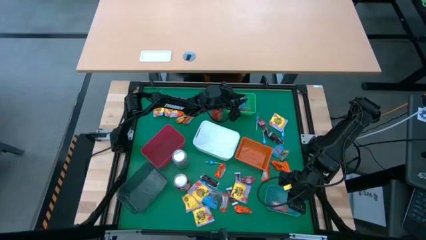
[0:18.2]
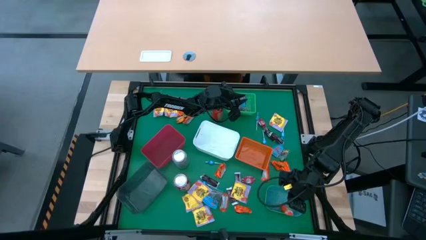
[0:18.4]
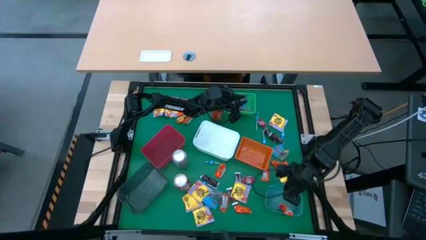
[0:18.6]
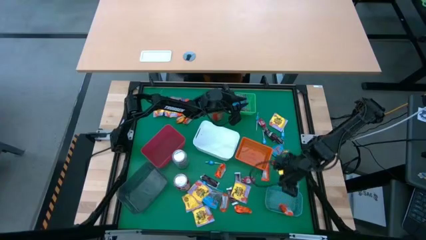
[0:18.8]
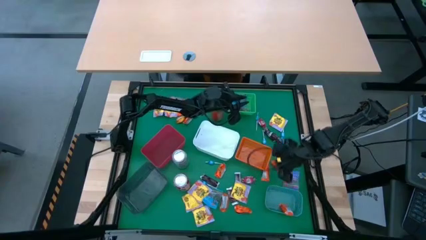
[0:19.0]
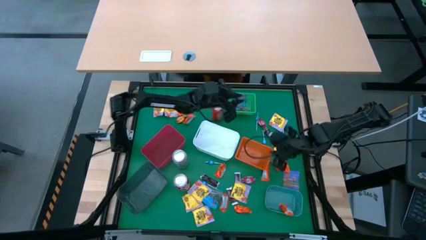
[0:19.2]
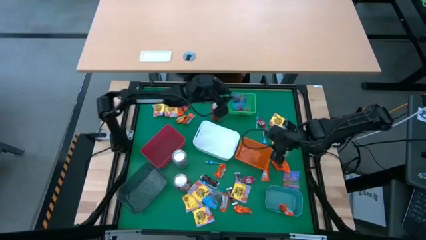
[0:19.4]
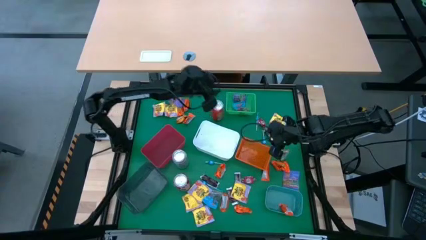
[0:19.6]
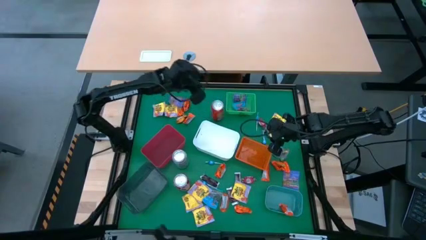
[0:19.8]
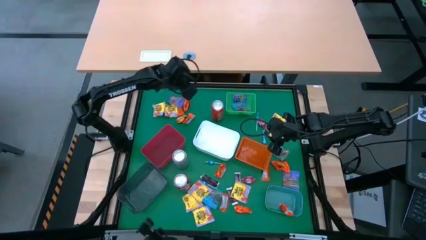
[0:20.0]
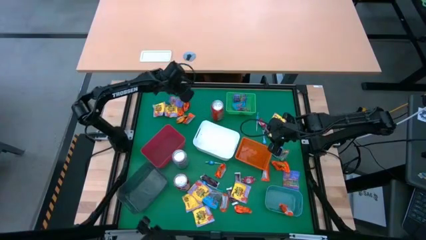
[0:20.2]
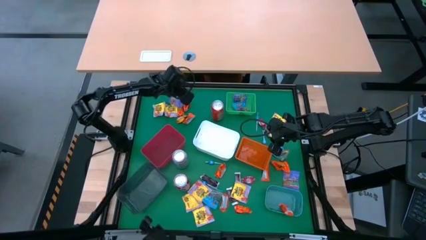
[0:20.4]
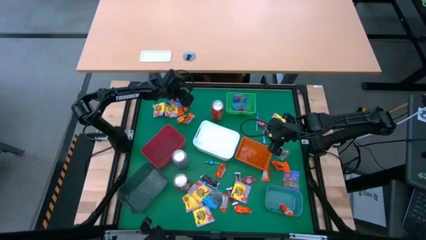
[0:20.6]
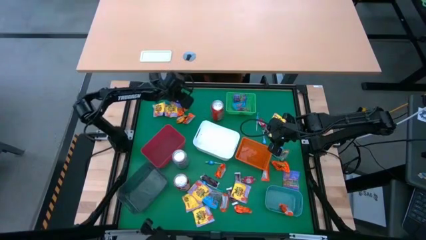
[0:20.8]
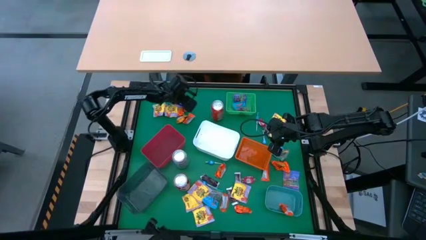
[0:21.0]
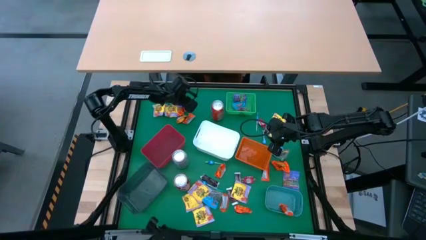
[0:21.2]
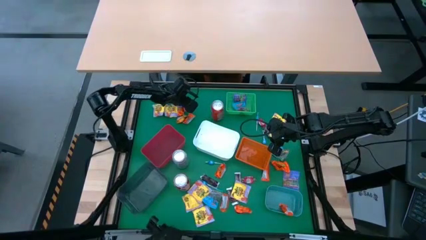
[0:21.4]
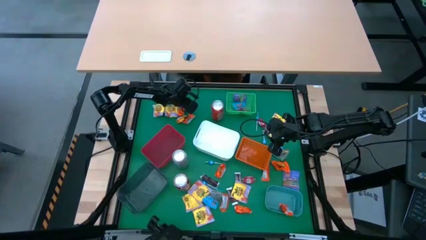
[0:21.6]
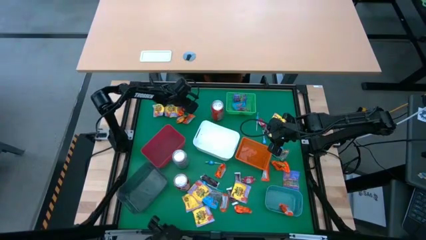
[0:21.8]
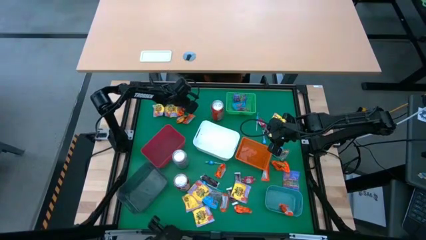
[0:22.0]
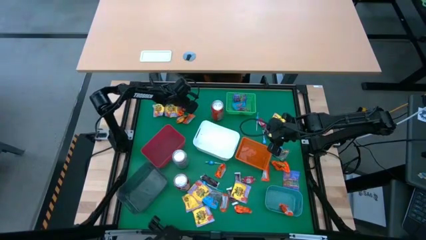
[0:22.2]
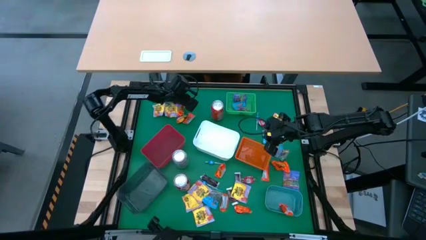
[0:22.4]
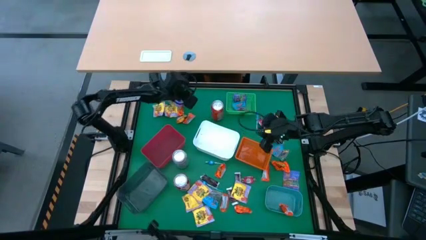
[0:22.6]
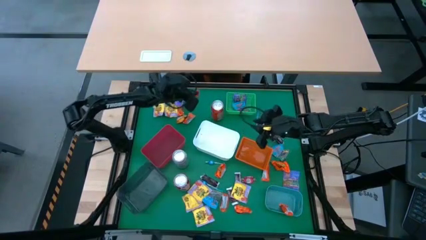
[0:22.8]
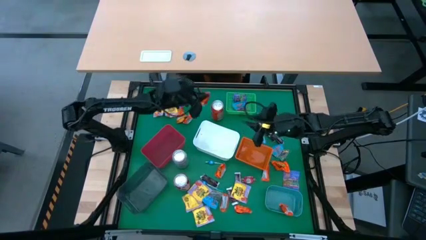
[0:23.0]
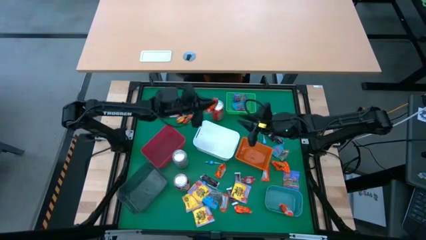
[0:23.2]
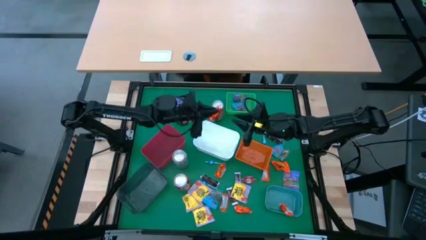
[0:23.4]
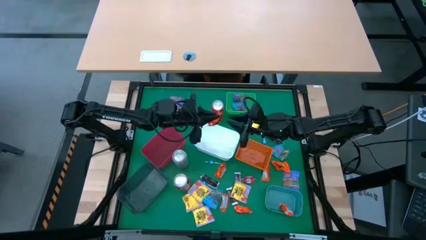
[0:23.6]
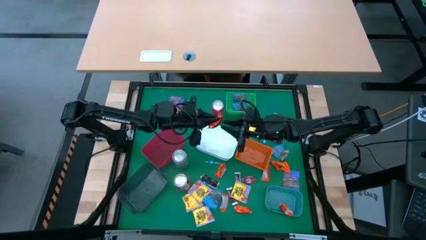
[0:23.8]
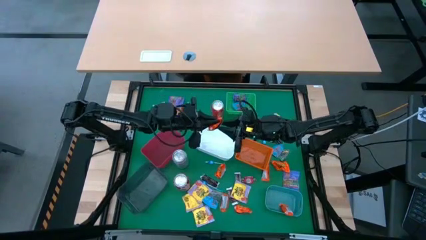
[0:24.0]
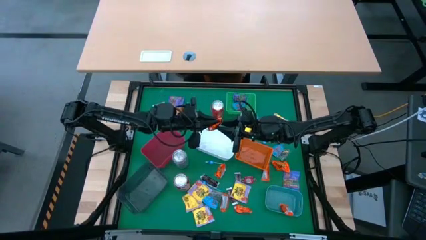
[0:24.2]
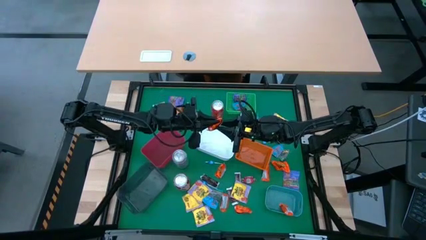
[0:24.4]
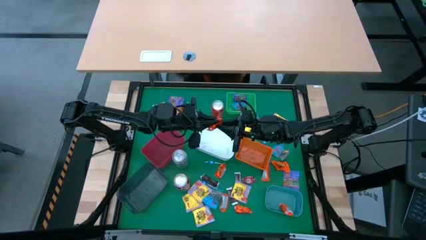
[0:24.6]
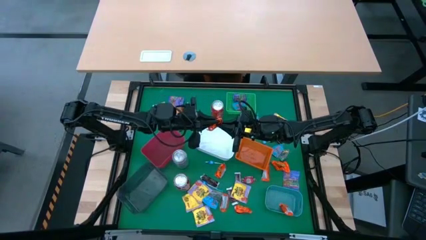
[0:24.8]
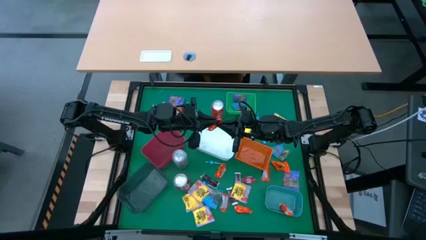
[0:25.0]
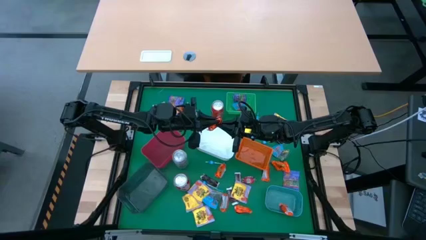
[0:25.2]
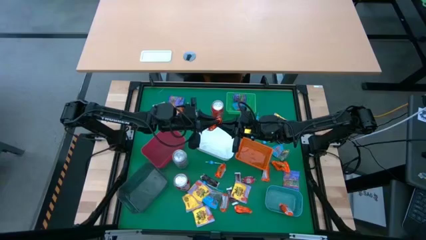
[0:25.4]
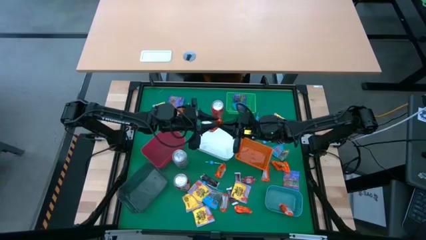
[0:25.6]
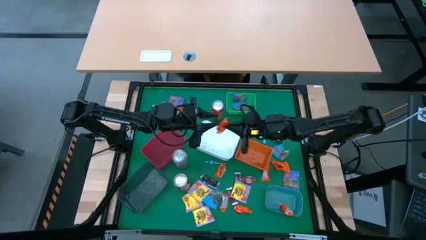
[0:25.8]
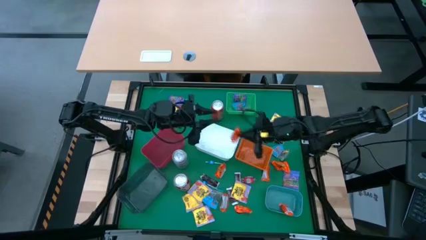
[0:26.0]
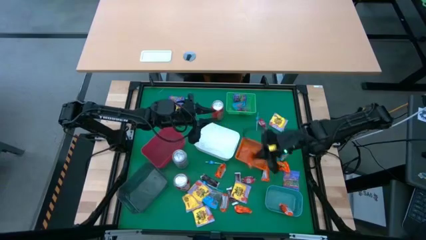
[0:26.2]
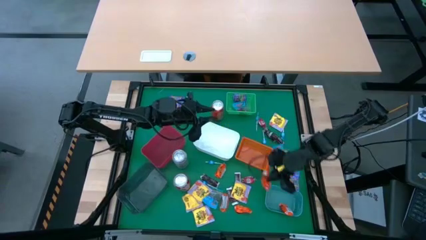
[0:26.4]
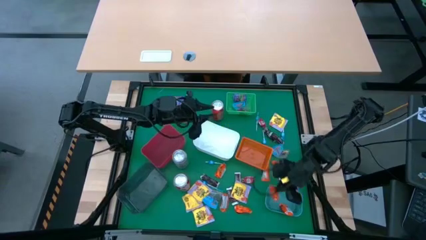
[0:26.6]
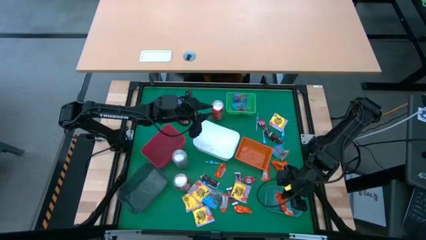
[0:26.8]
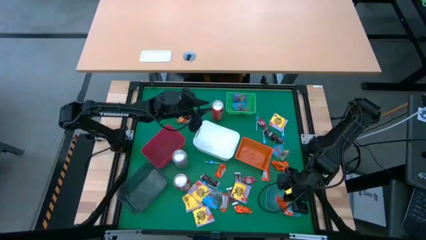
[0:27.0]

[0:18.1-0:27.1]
Task: Sort candy
Put the orange chocolate into the blue bin

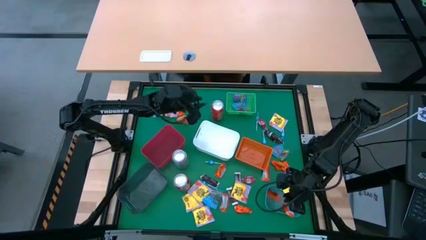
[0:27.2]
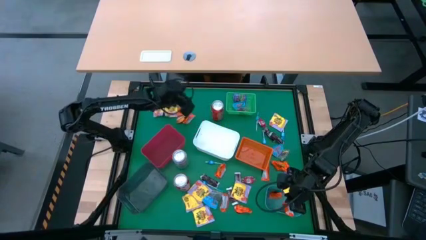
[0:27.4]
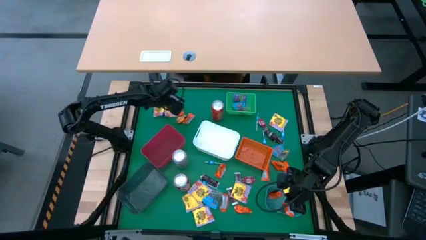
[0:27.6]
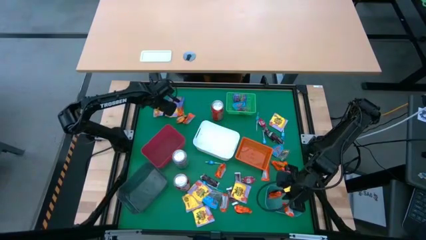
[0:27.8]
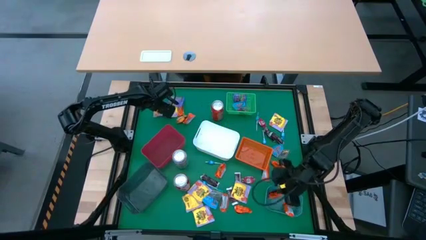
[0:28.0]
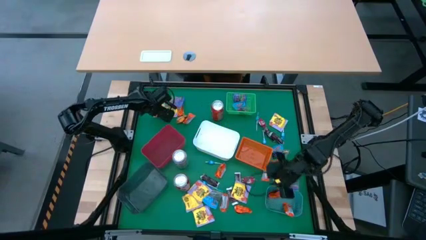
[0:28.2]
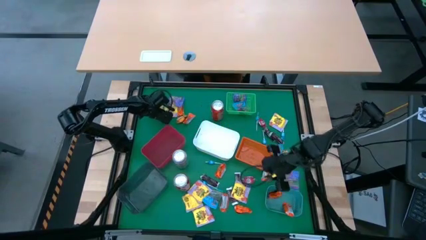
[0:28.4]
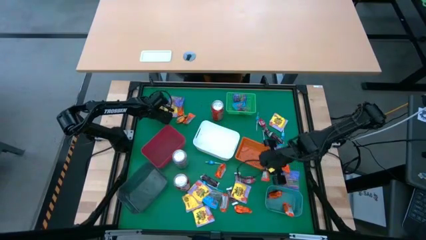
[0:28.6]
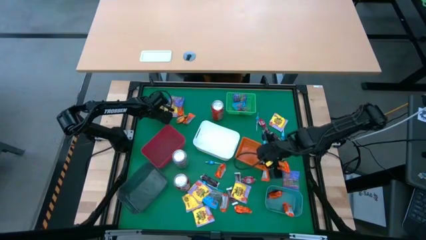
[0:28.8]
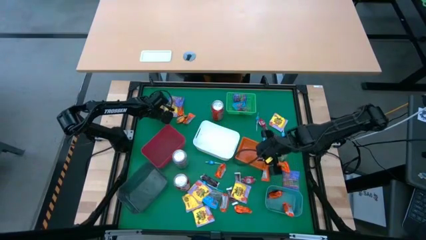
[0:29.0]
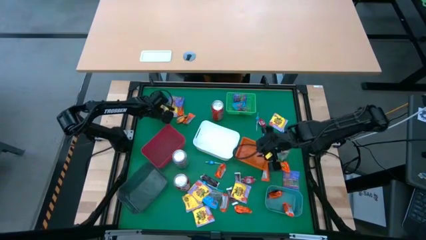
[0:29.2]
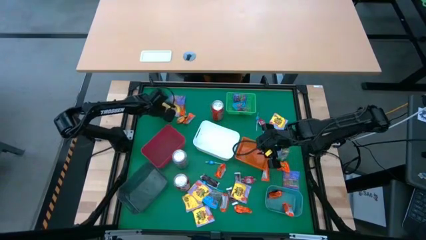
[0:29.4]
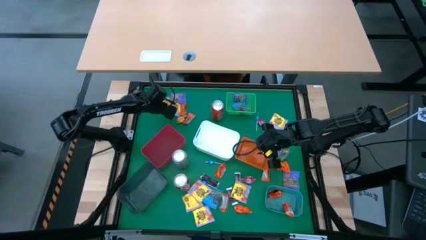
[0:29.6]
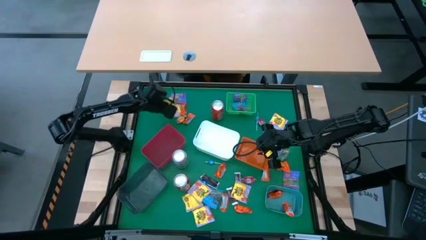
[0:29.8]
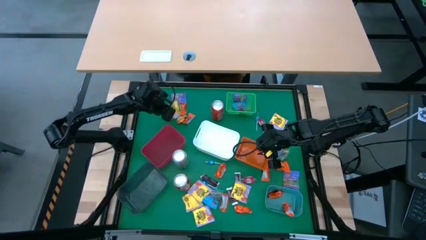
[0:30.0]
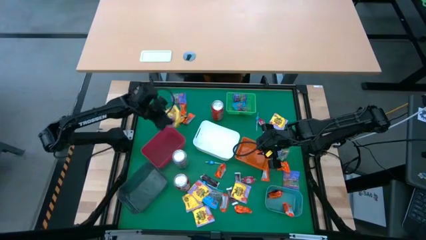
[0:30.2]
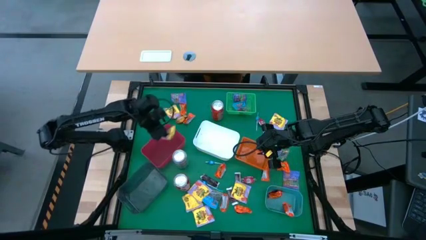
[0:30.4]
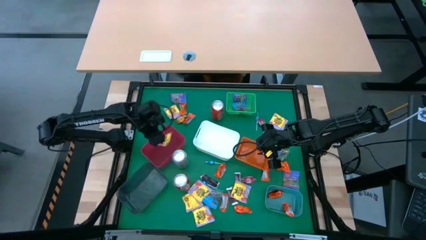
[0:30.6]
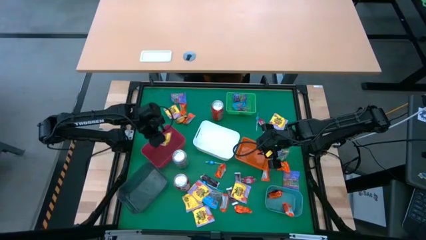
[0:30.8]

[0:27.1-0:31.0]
Put the yellow candy into the red bin

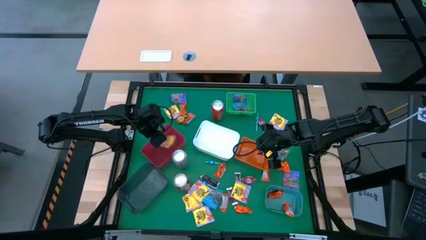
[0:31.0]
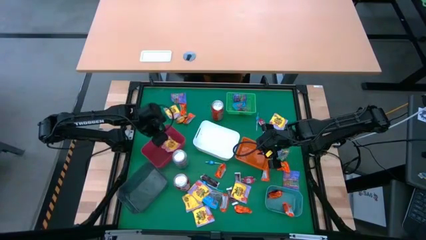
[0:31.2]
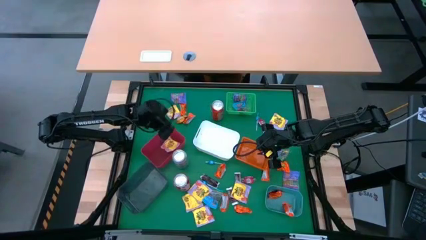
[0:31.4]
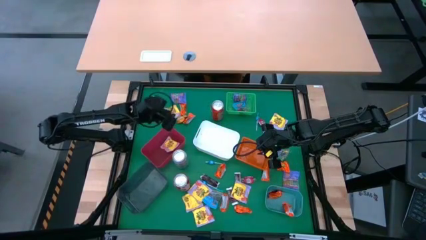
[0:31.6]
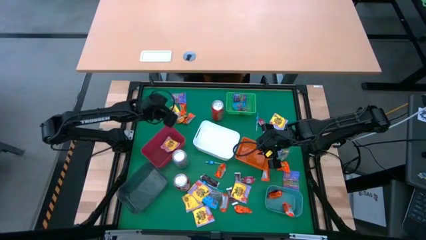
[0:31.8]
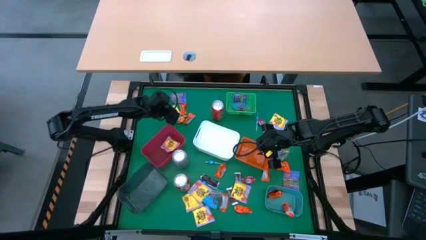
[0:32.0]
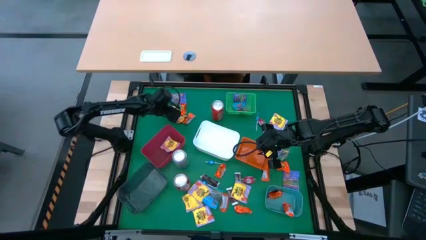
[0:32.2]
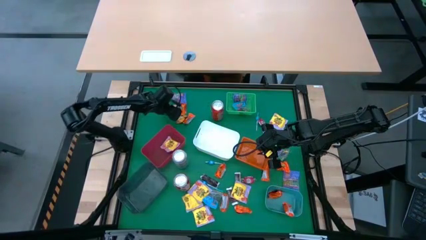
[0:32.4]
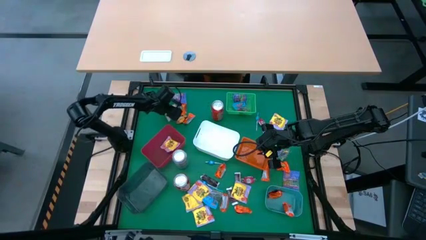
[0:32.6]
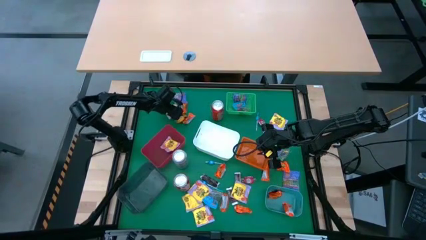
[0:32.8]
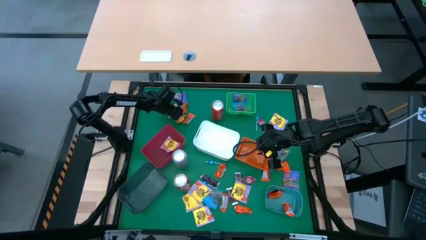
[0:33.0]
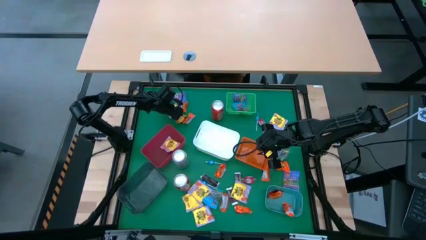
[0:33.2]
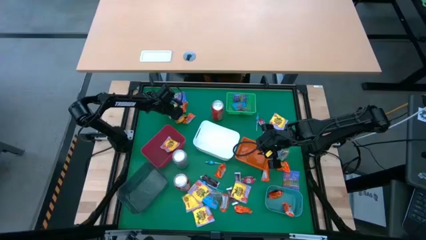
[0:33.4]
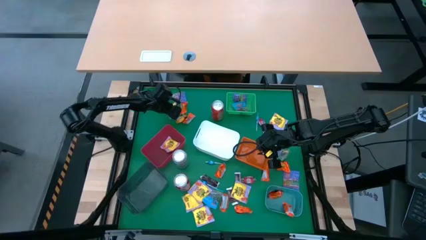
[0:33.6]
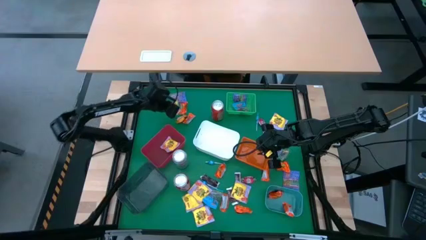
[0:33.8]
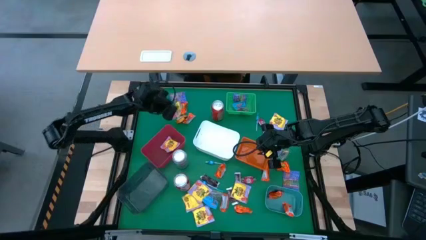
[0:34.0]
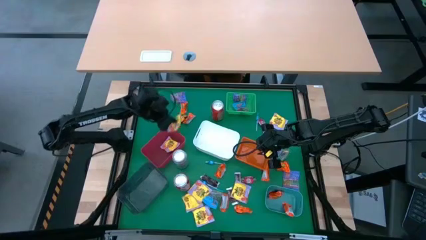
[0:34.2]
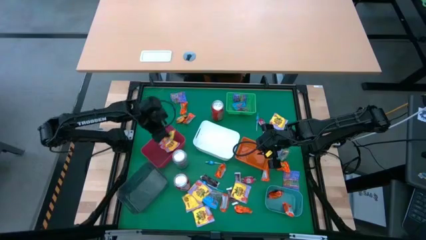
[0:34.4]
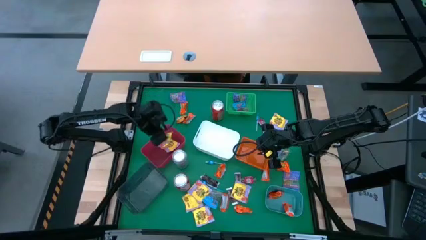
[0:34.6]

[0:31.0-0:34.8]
Put the yellow candy into the red bin
